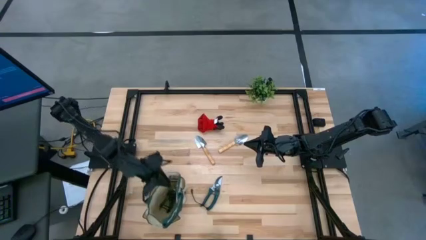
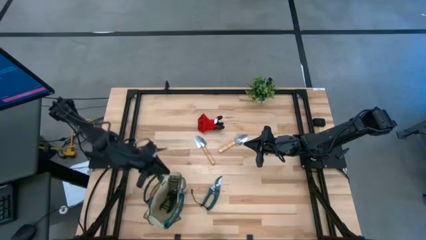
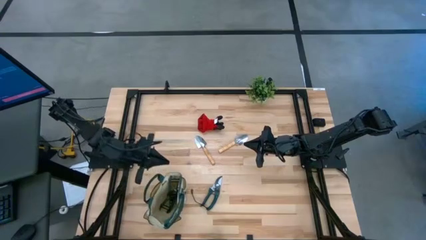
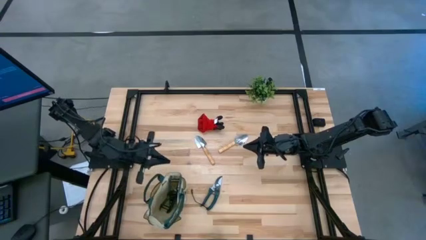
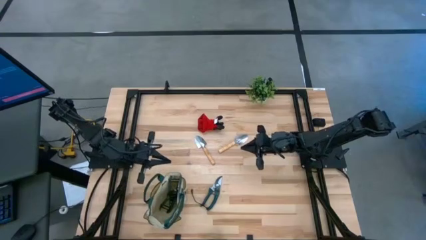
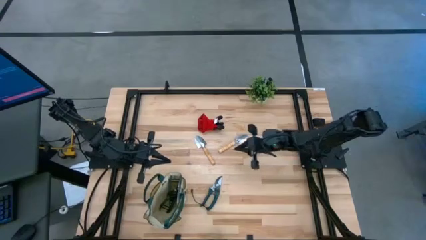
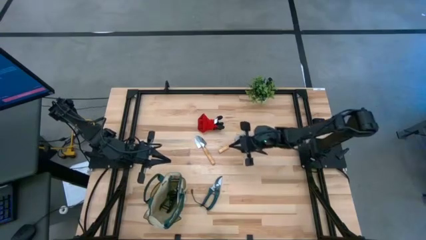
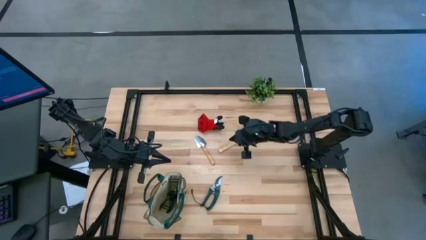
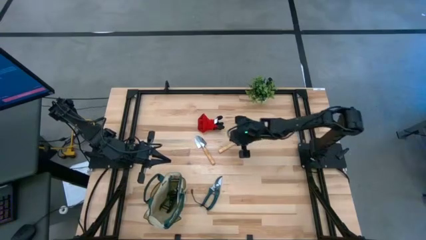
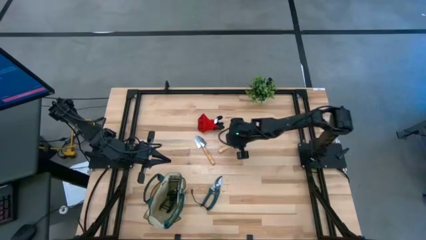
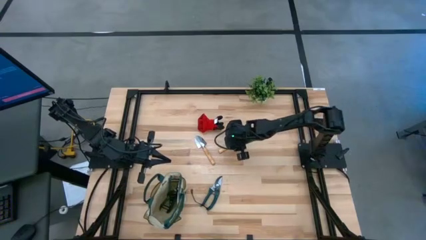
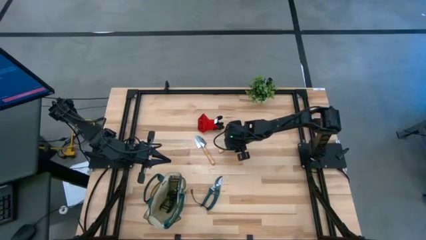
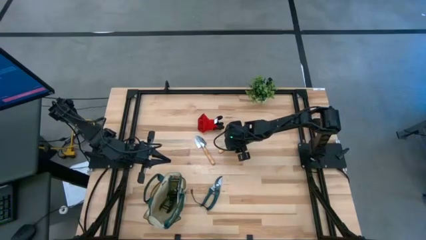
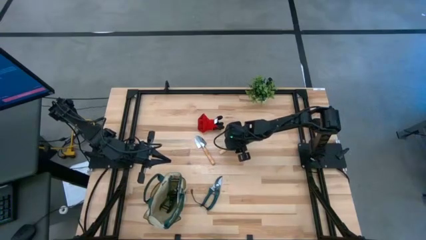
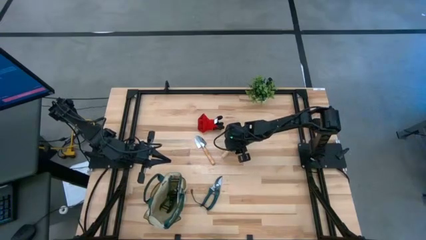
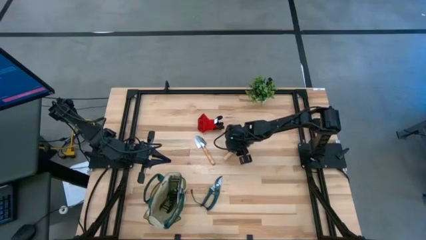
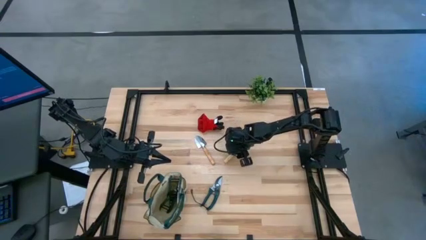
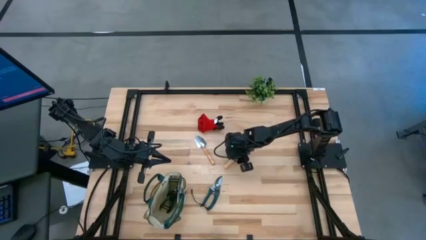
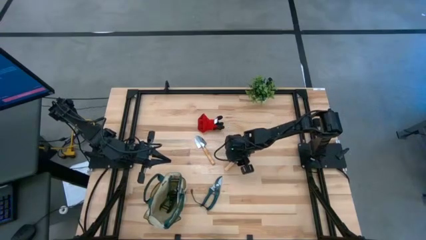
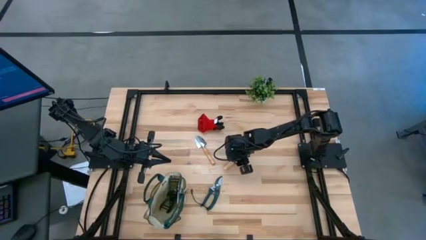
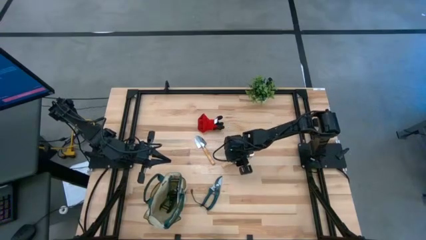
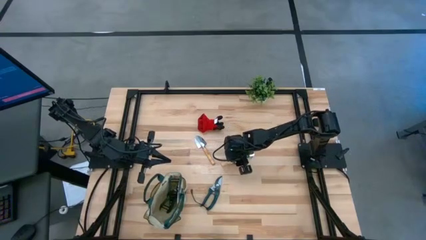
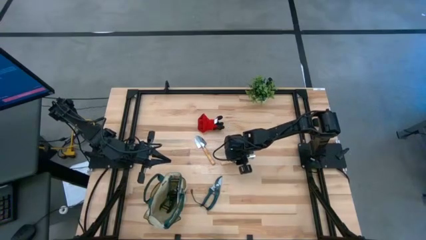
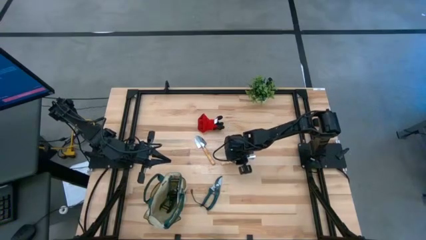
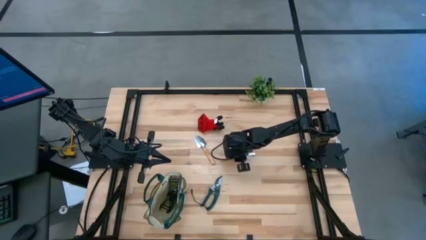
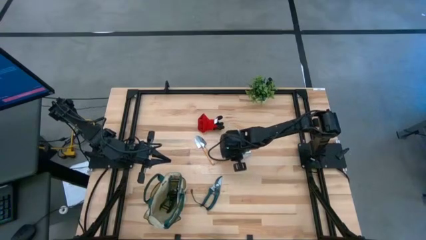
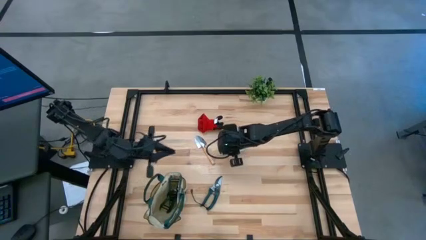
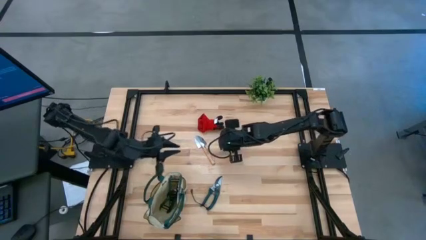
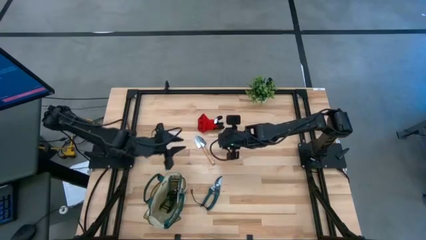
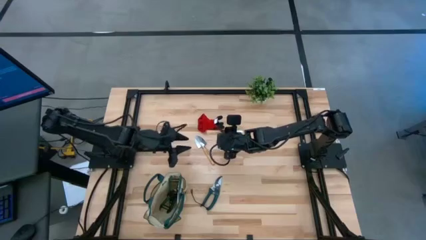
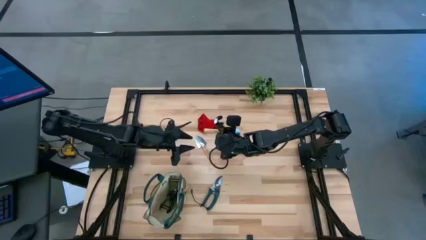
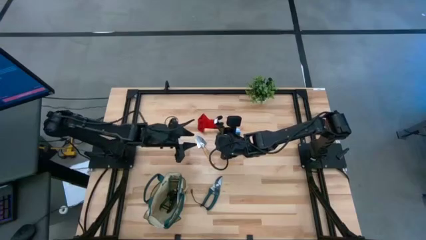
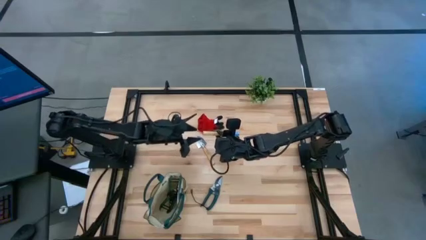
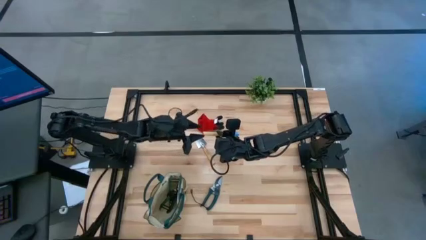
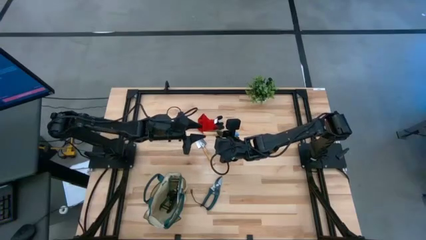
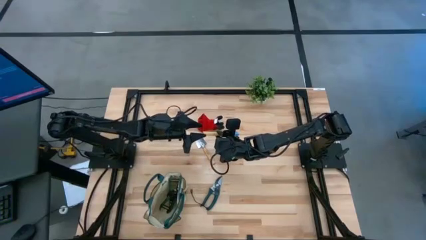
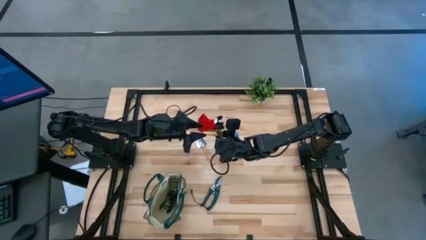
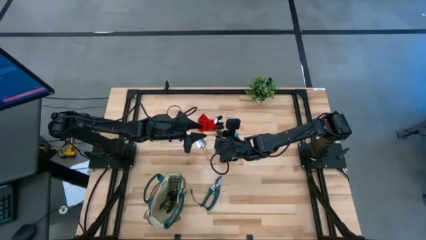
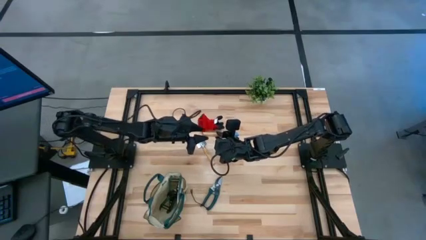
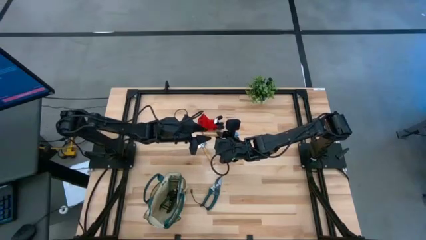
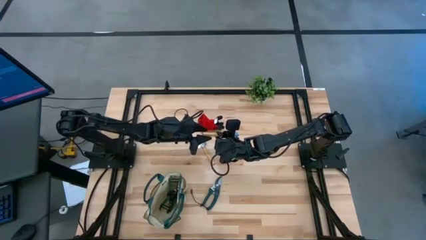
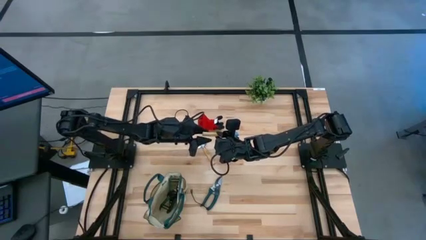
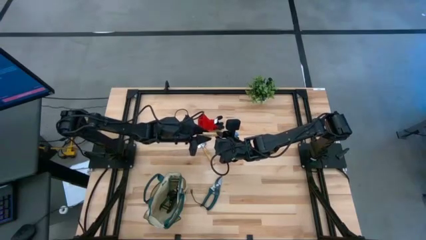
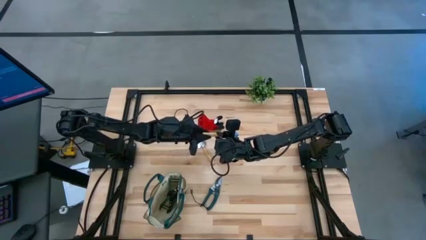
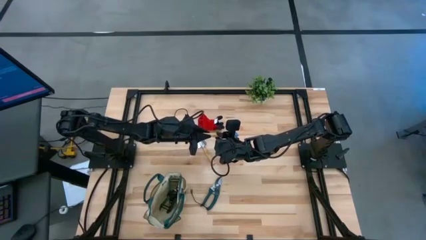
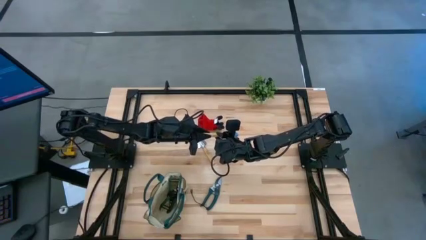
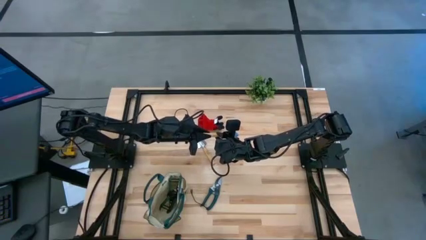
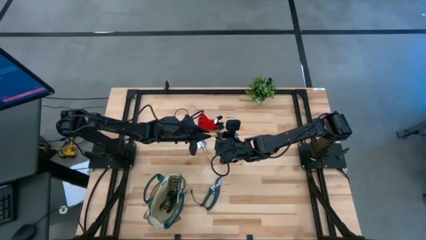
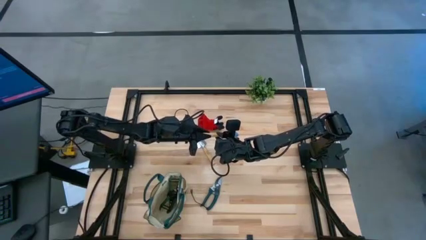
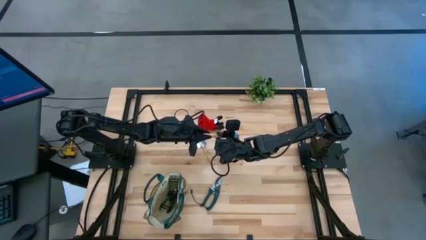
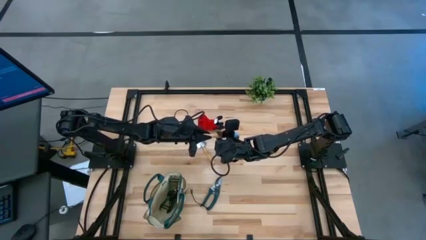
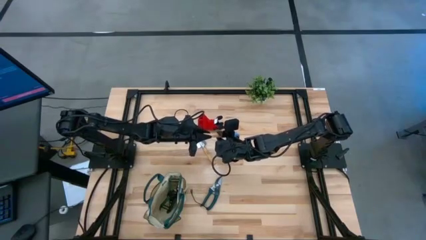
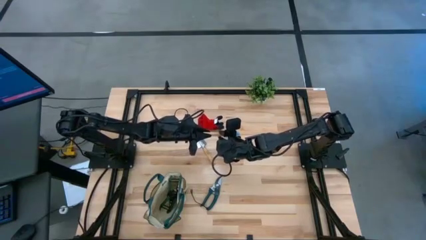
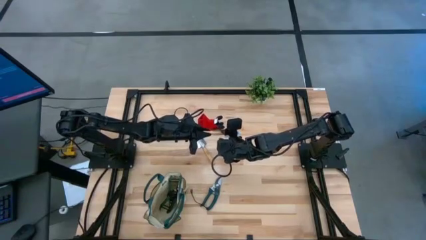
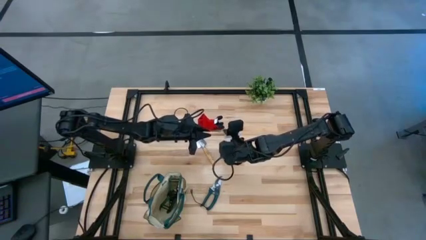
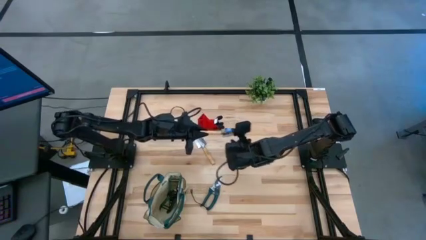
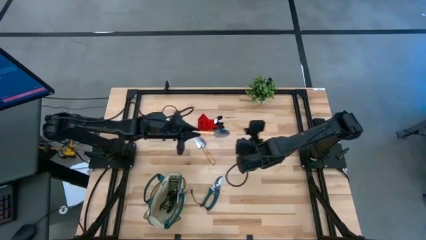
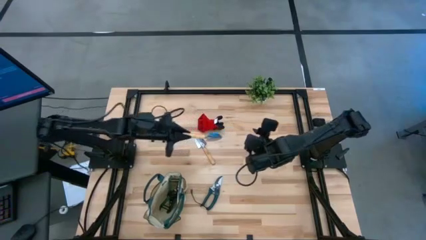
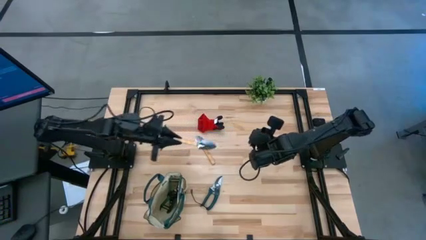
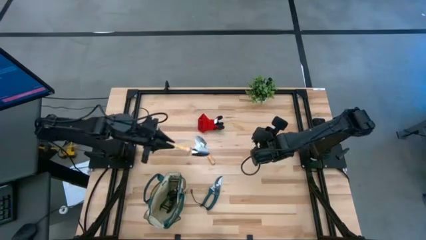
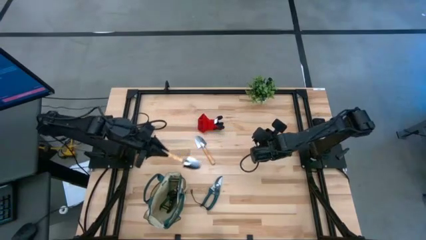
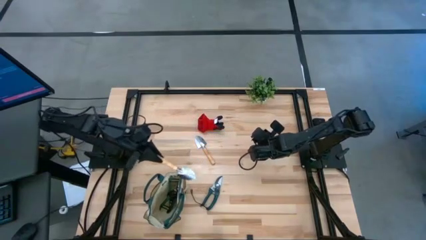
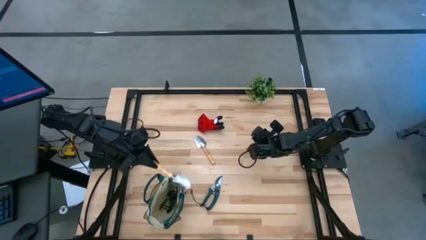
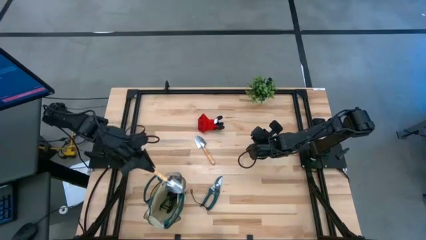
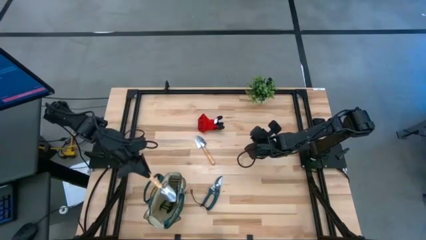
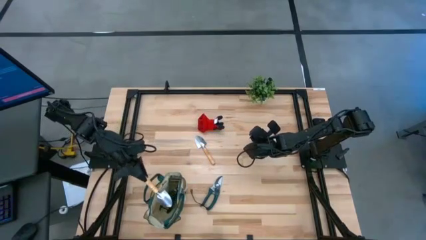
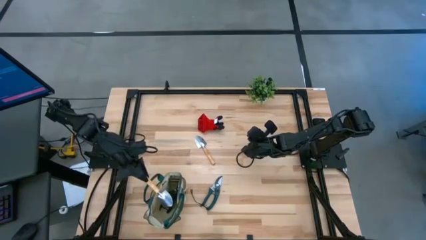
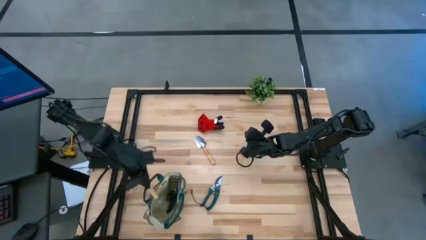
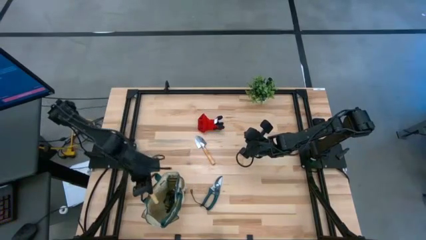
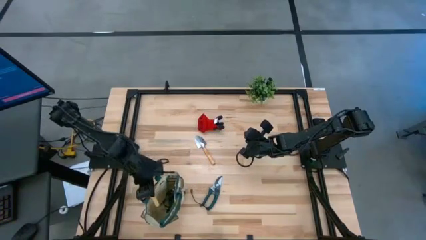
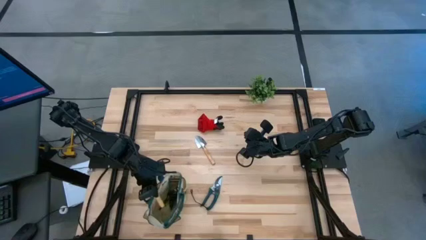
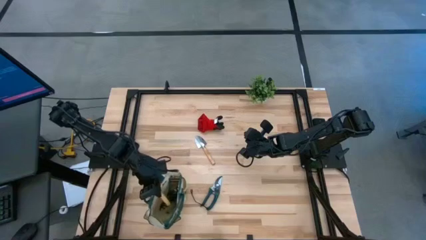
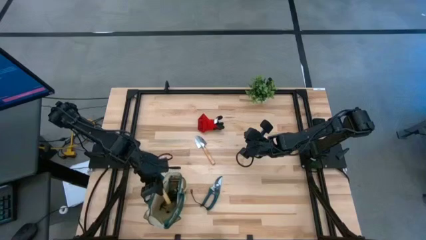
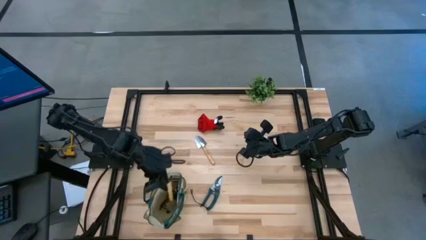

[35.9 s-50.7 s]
Task: Pick & Place Garden tools in Gardening bag
Put the right brown trowel into the green gardening bag
